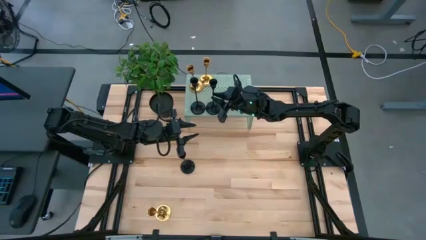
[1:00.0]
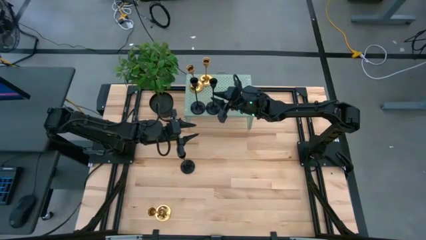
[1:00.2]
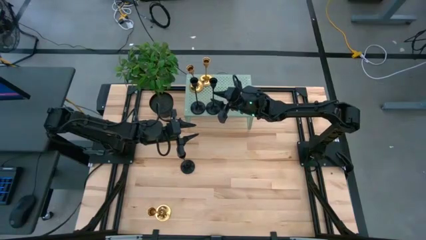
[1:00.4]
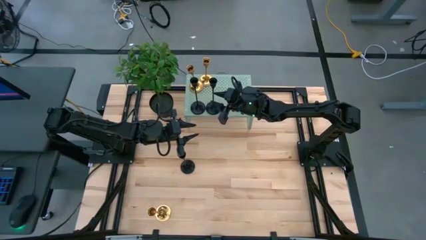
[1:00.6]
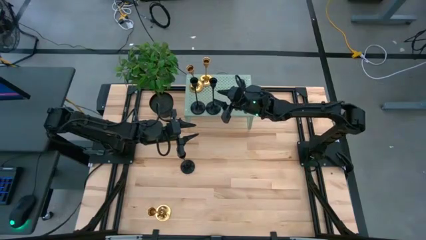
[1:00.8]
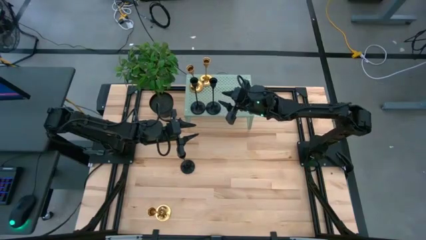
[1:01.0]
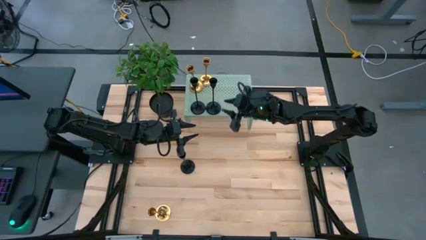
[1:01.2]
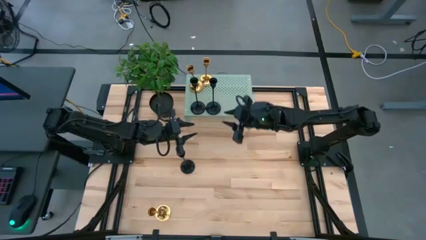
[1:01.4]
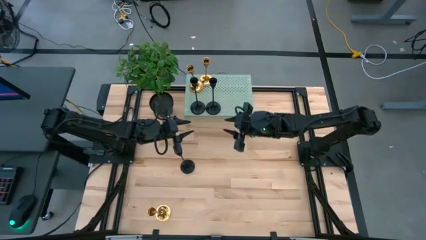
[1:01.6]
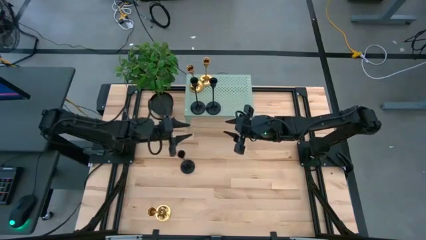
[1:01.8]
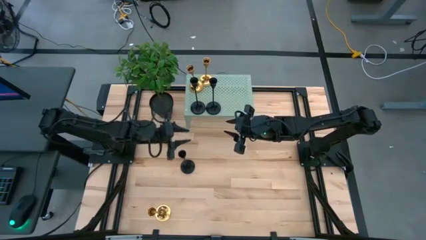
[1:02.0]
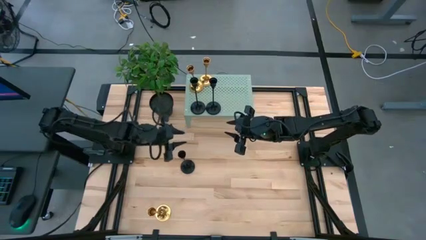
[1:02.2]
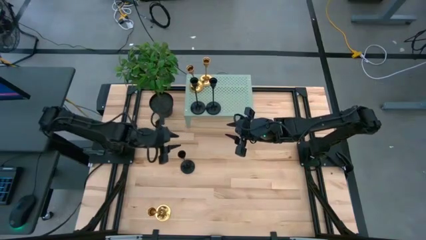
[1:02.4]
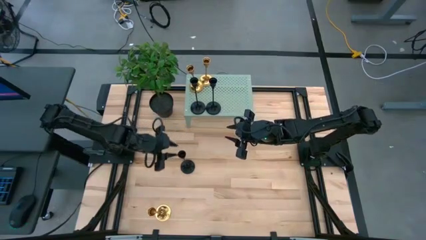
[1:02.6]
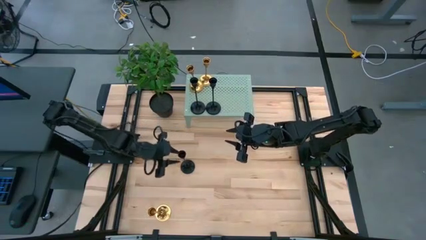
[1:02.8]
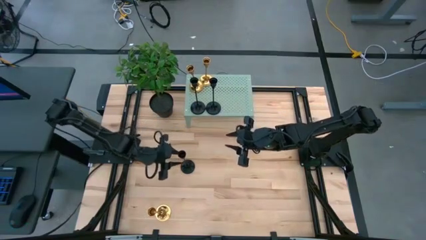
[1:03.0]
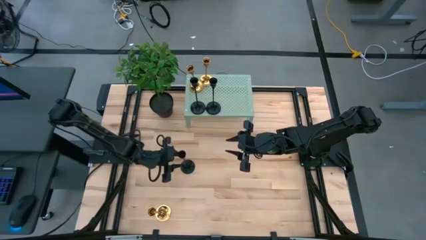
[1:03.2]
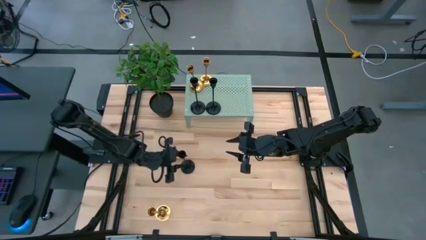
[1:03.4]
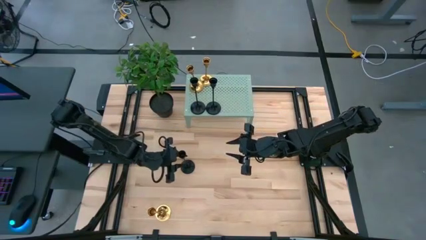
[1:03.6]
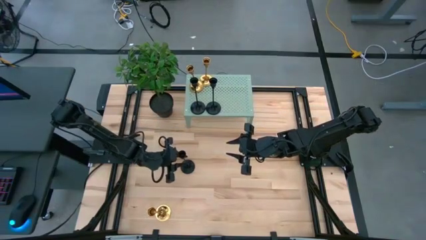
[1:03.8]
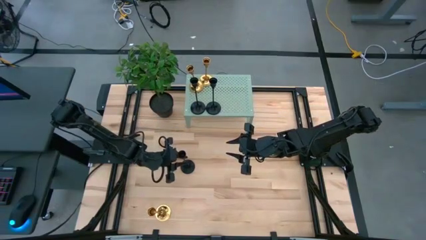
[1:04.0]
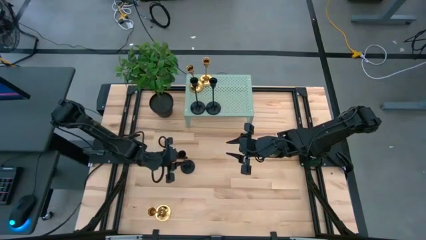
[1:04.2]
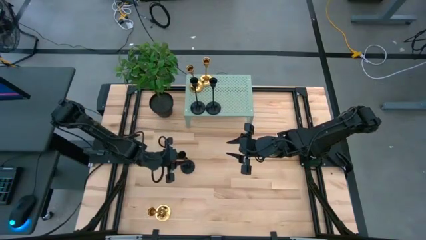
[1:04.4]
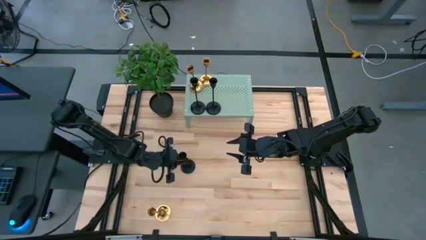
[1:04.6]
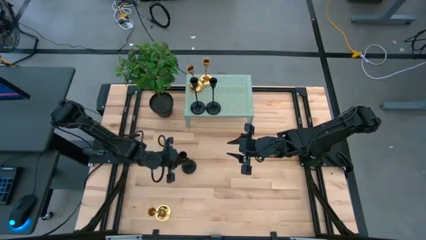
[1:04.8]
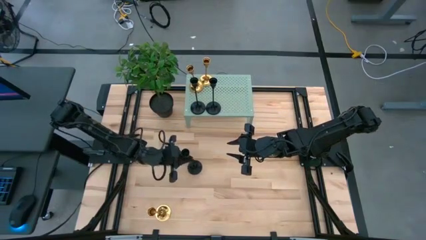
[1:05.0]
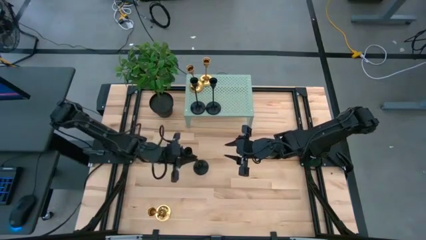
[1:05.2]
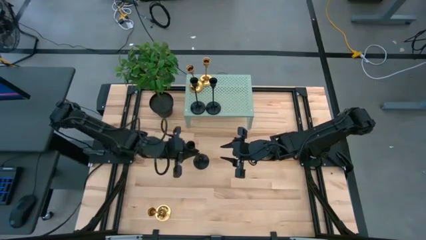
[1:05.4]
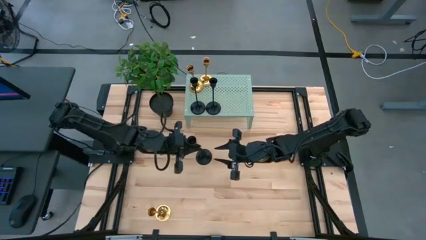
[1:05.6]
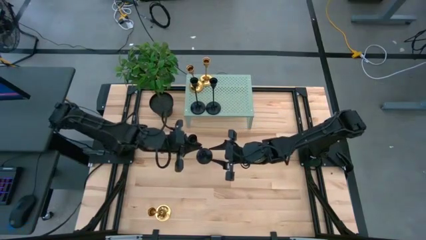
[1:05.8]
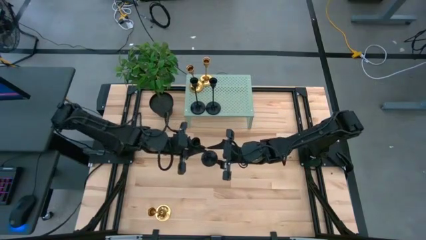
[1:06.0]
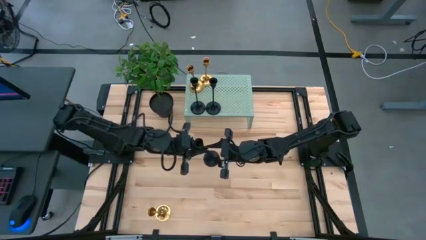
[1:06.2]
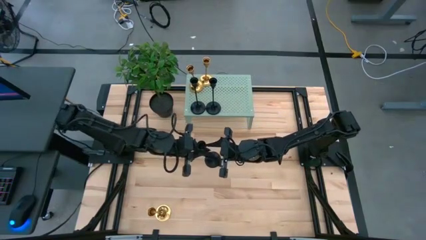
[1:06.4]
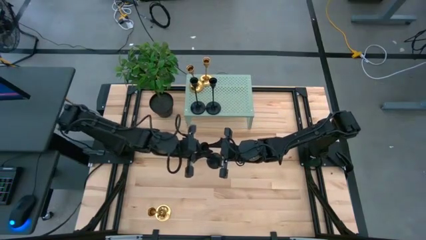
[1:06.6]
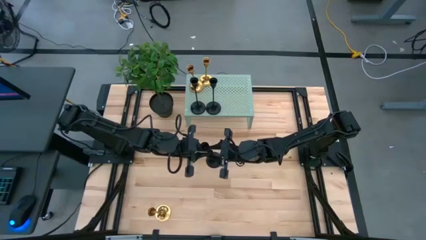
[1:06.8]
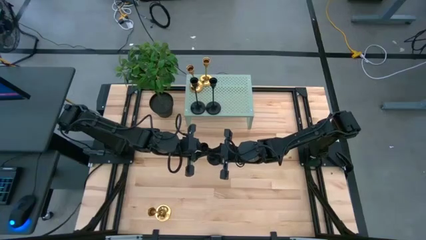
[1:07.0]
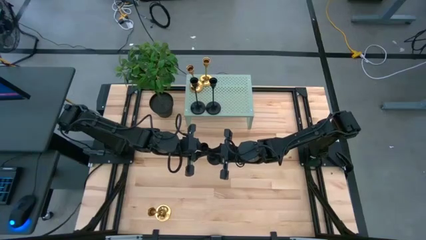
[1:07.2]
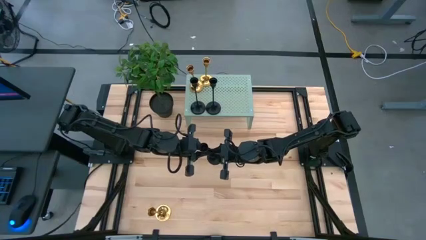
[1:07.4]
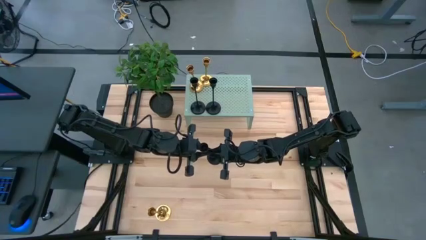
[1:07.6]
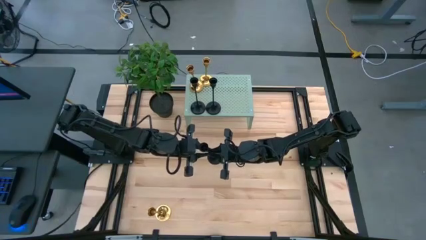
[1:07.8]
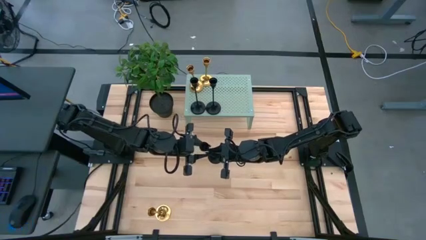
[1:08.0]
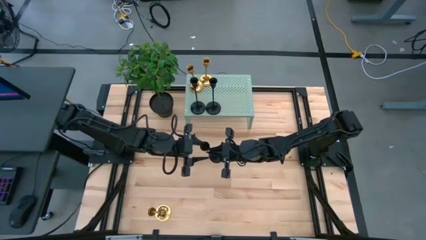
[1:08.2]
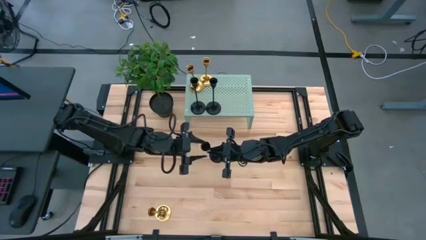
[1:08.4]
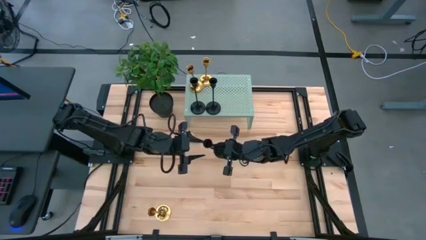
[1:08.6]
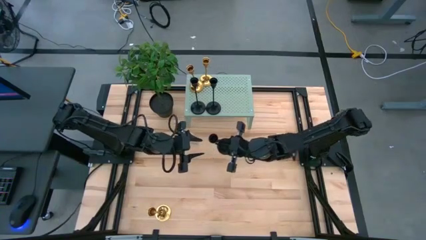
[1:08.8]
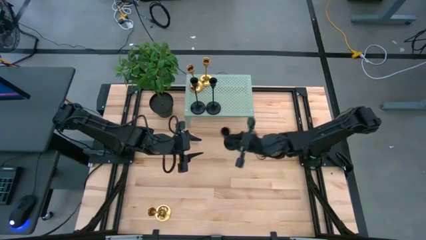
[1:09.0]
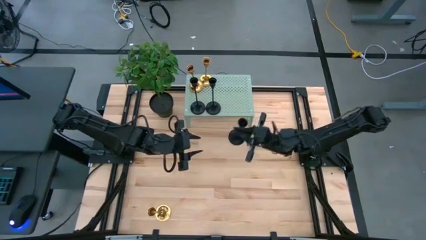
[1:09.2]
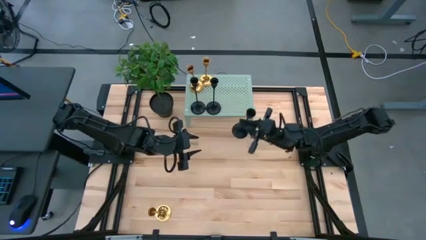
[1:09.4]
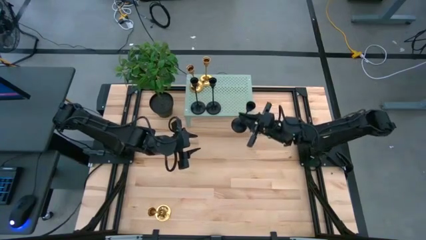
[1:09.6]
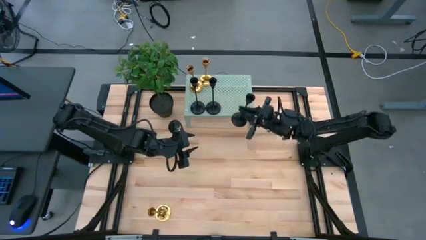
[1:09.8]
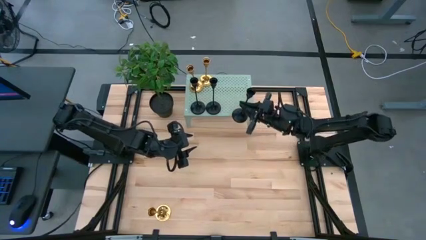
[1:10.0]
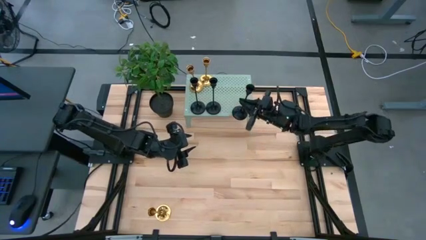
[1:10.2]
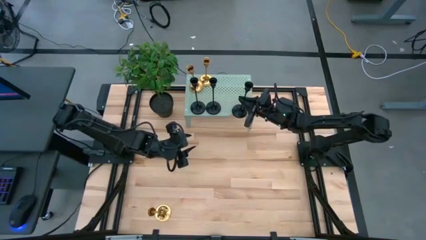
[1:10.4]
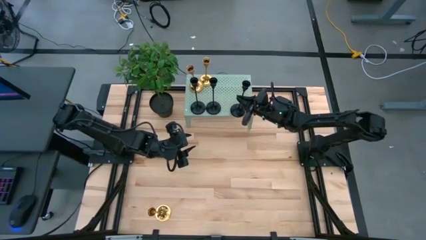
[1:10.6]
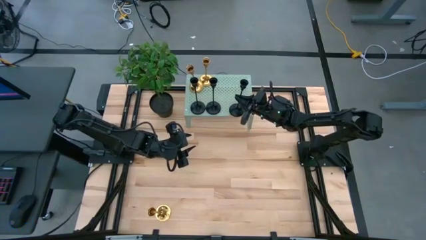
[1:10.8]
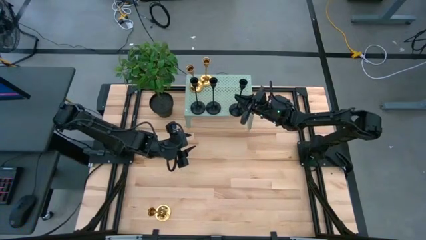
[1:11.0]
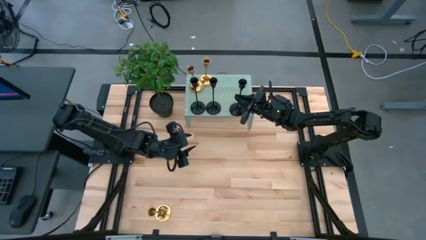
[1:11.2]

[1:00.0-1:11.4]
Task: Pick & Place candle stick holders
Put the black candle holder on the shelf

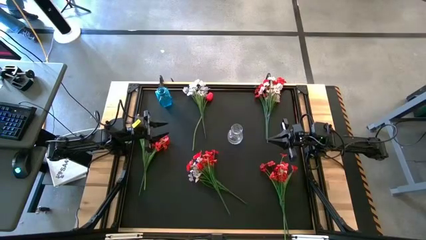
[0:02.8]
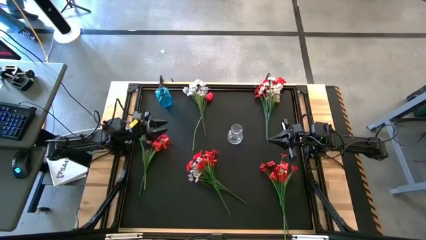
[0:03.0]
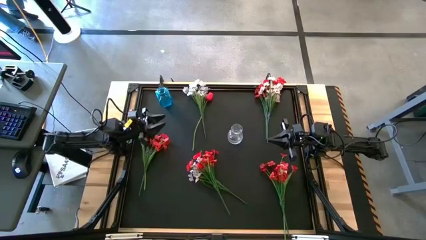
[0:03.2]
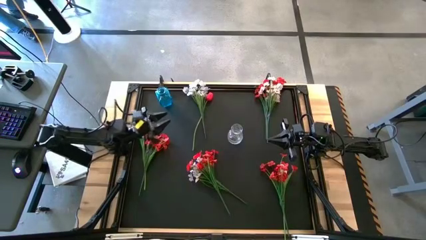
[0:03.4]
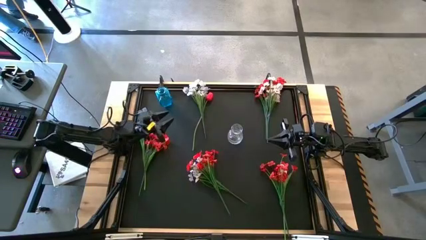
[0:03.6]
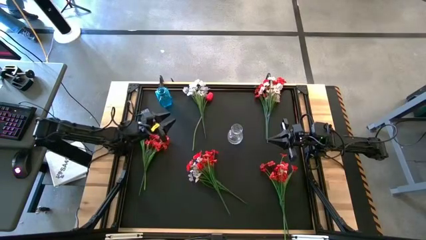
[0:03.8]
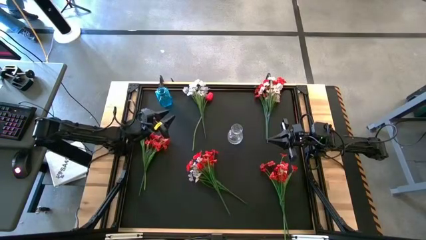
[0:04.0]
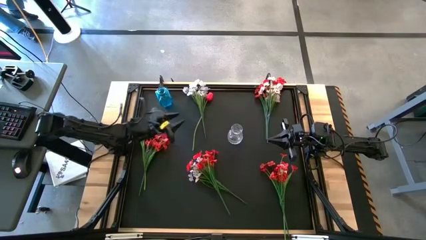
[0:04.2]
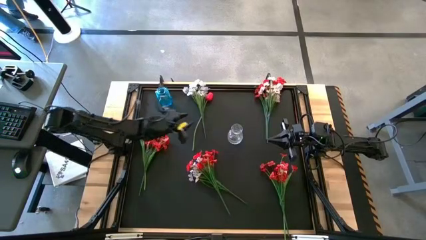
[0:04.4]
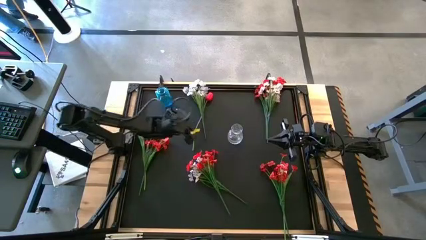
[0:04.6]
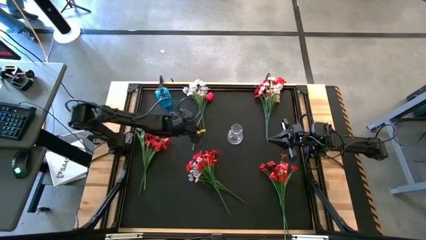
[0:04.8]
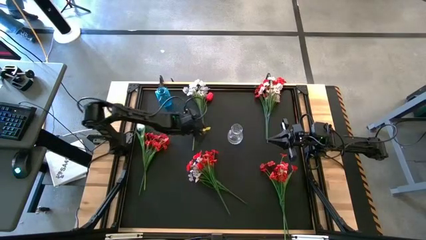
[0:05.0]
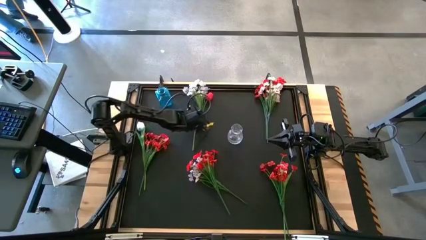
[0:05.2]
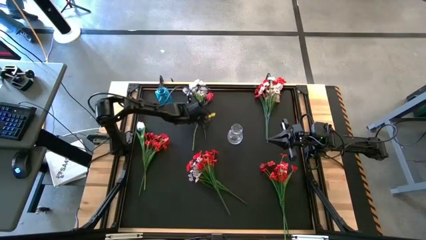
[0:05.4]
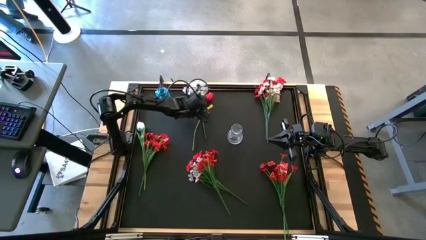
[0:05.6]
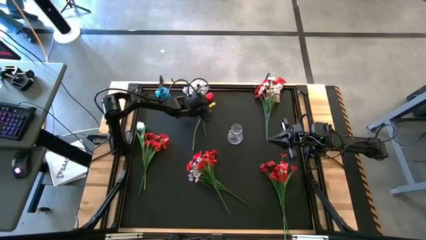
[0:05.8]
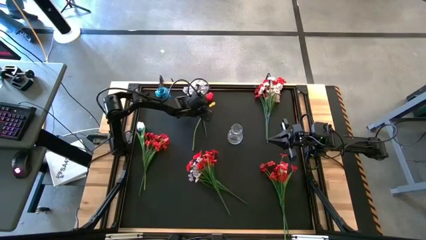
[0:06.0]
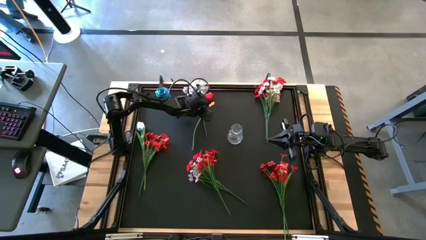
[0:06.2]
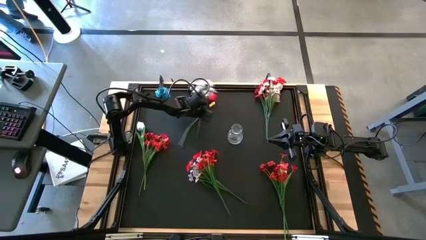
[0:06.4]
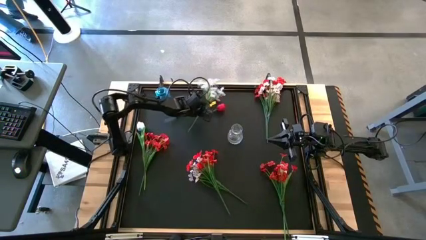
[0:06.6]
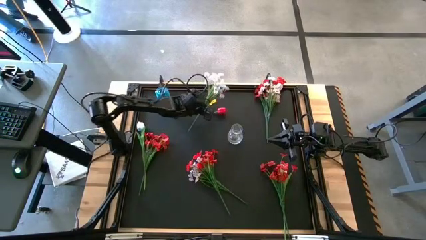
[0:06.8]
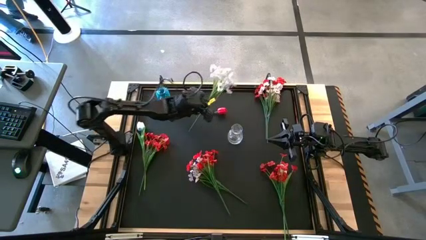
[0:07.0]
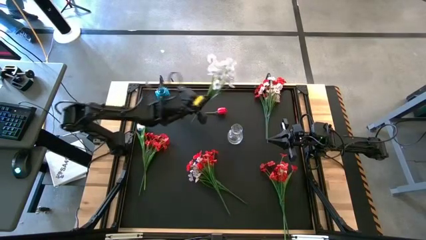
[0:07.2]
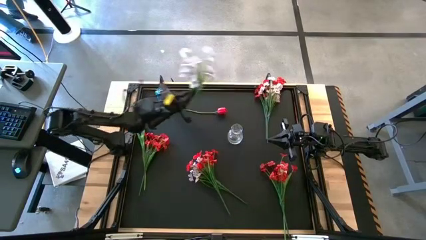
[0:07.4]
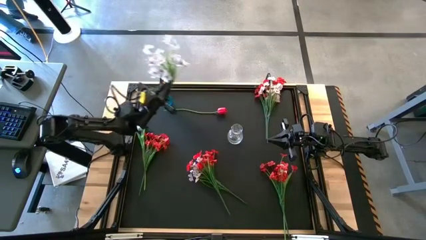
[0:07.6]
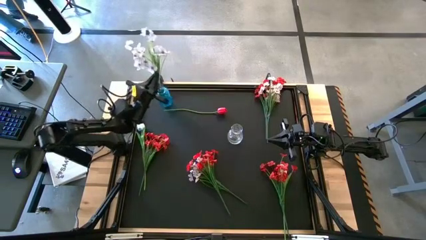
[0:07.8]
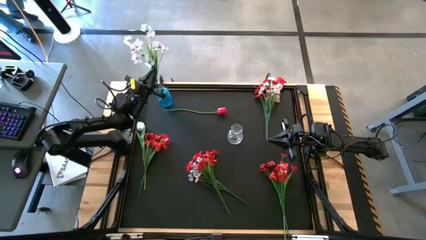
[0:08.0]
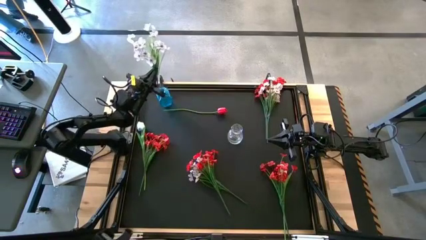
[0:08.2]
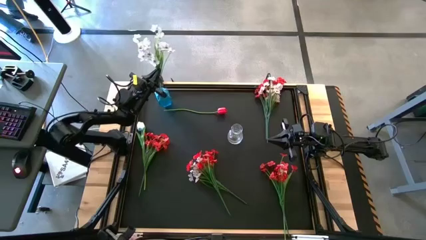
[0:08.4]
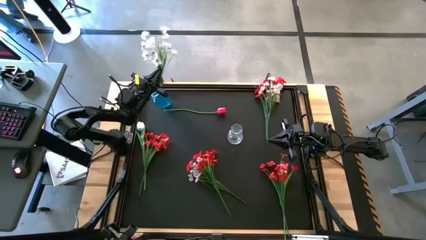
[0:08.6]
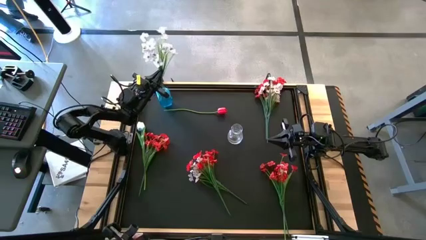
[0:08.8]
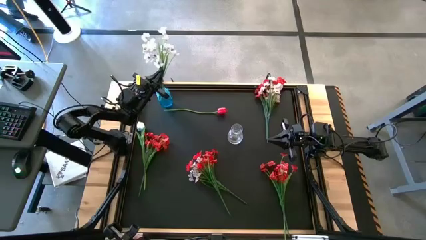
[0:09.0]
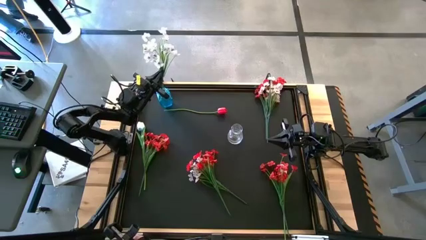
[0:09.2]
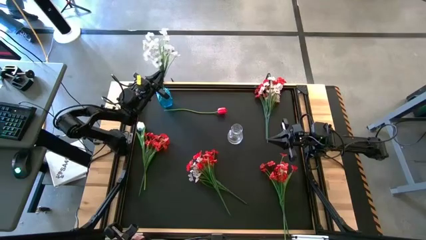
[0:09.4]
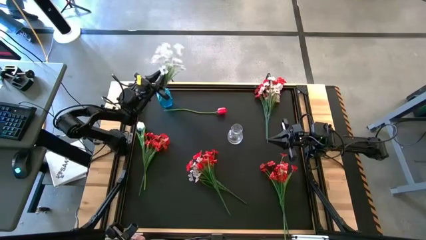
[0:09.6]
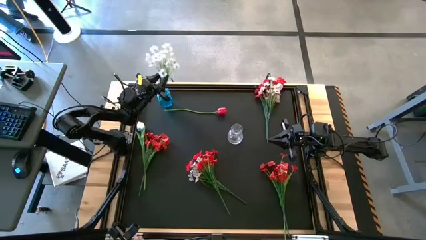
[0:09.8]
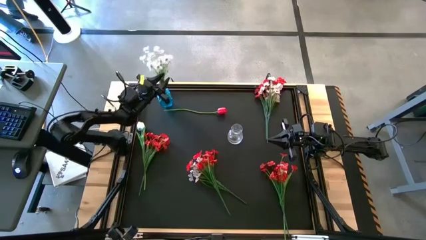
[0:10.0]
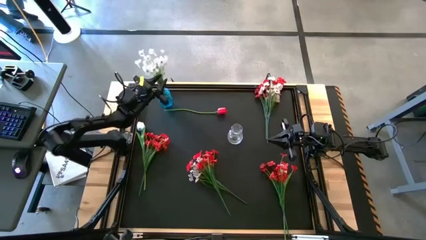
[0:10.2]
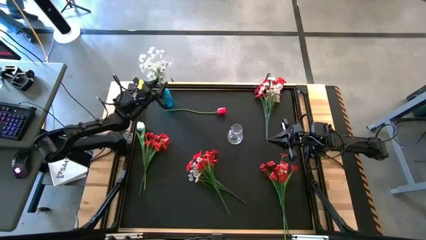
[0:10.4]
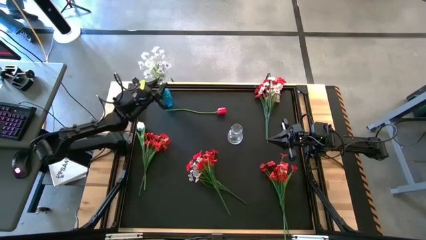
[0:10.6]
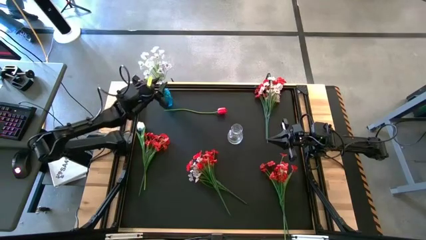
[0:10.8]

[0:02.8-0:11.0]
Task: Sort flowers into vase by color
Put the top left white flowers into the blue vase
